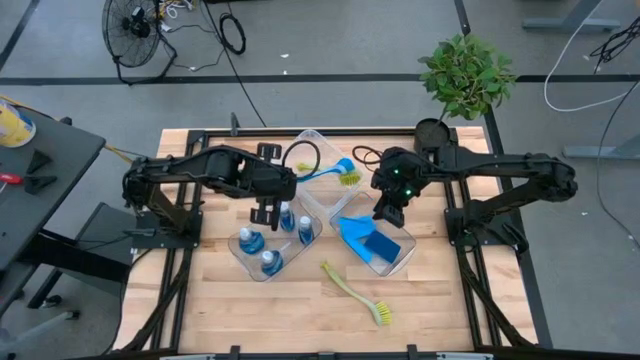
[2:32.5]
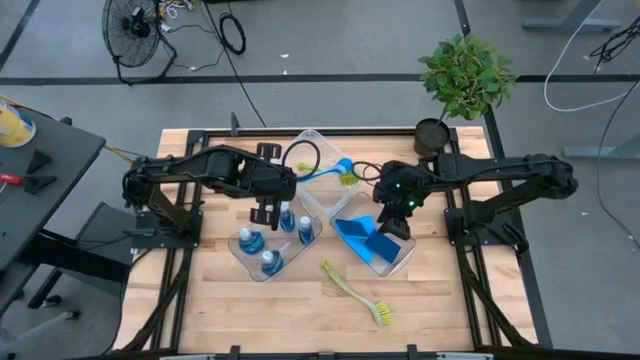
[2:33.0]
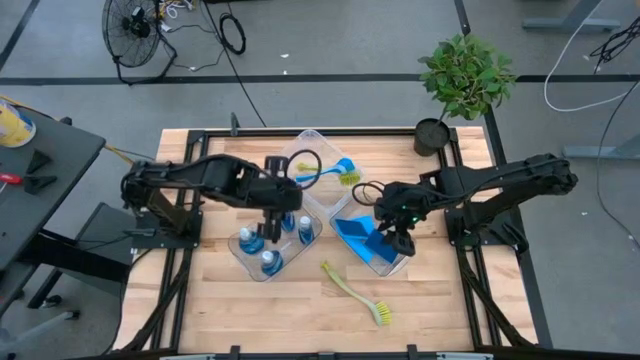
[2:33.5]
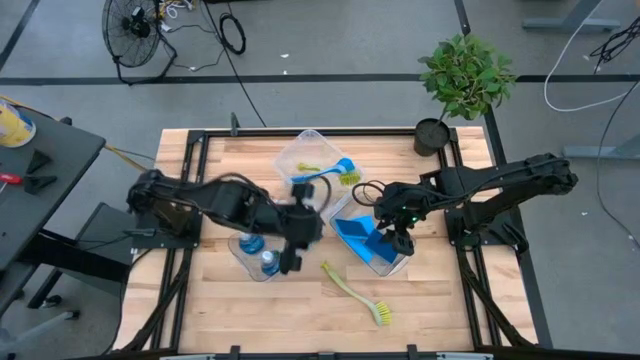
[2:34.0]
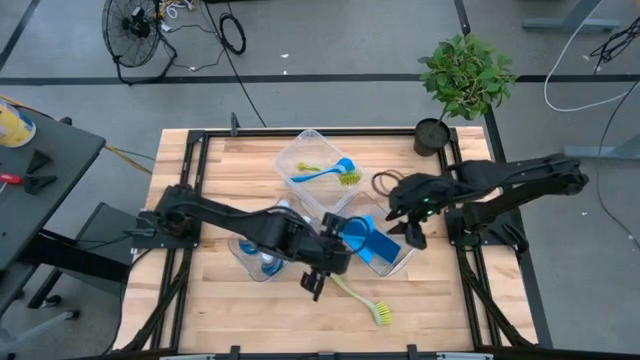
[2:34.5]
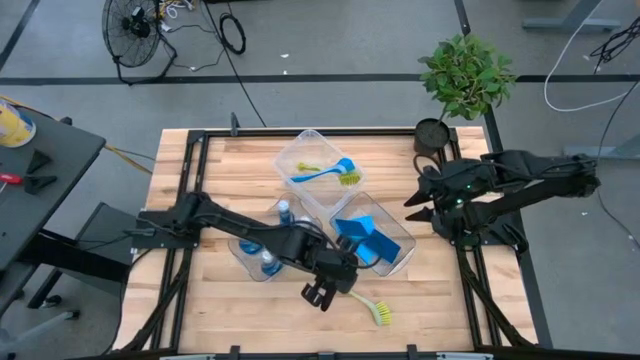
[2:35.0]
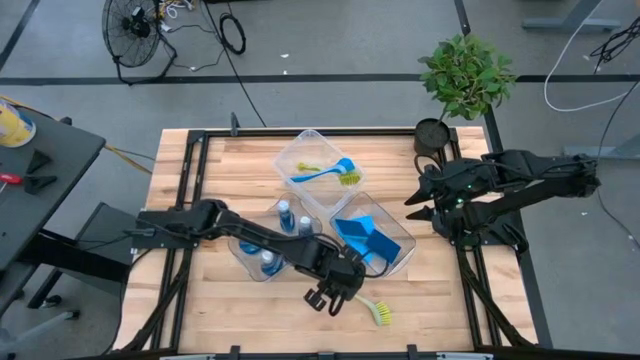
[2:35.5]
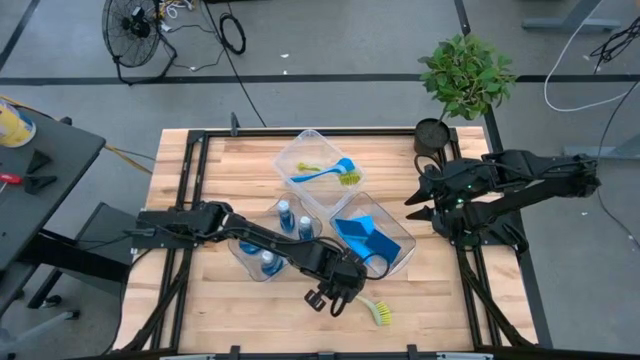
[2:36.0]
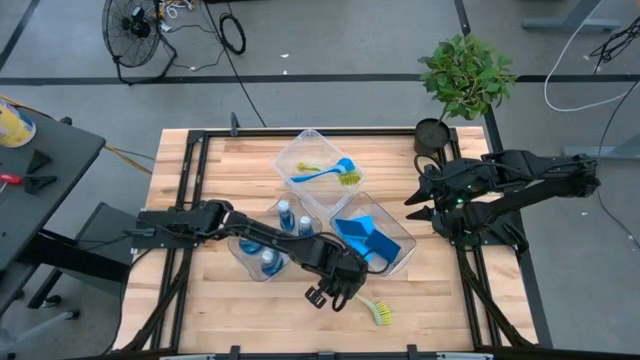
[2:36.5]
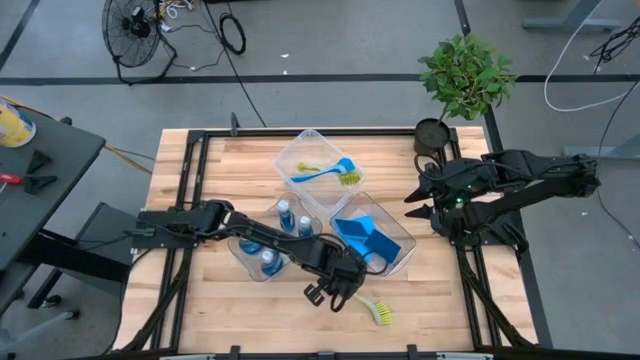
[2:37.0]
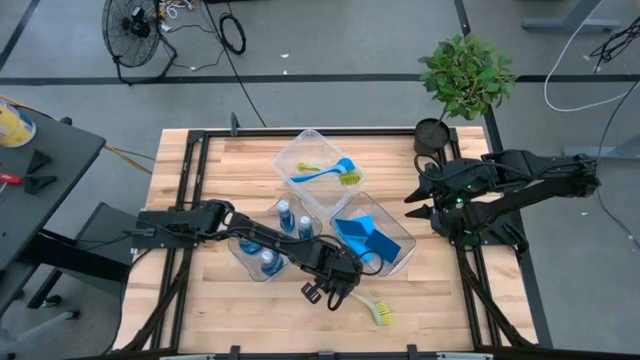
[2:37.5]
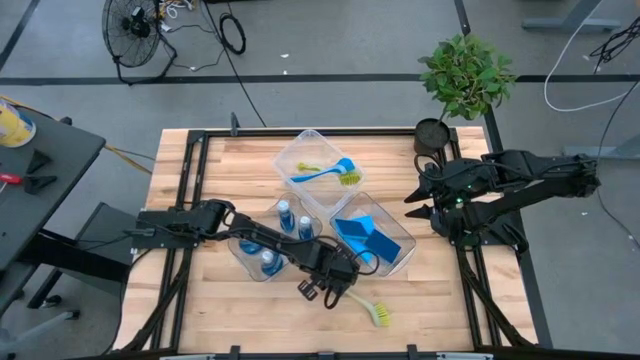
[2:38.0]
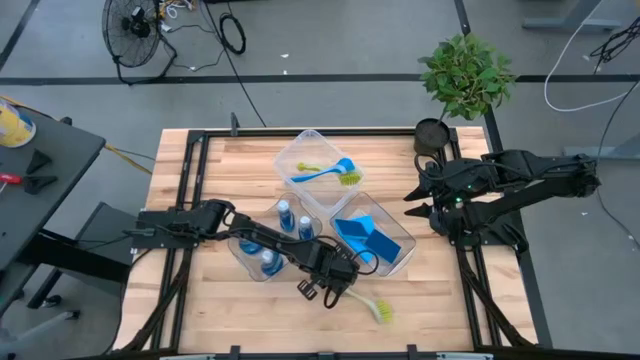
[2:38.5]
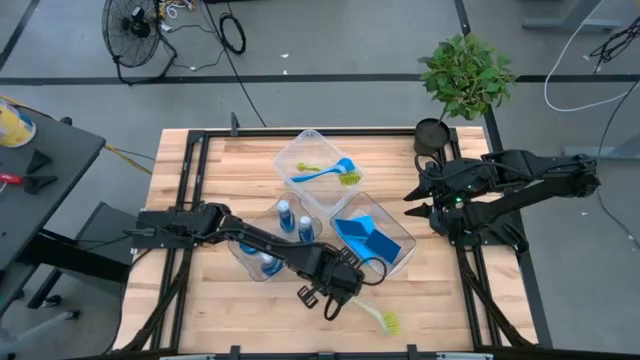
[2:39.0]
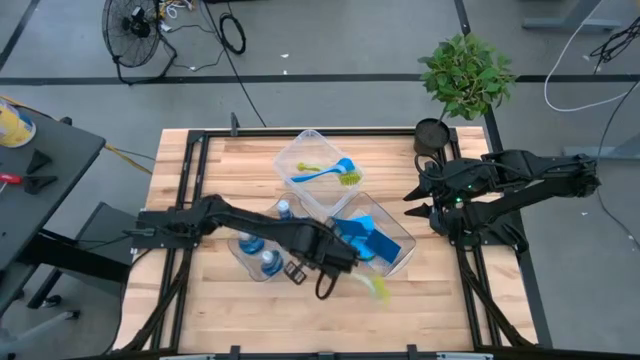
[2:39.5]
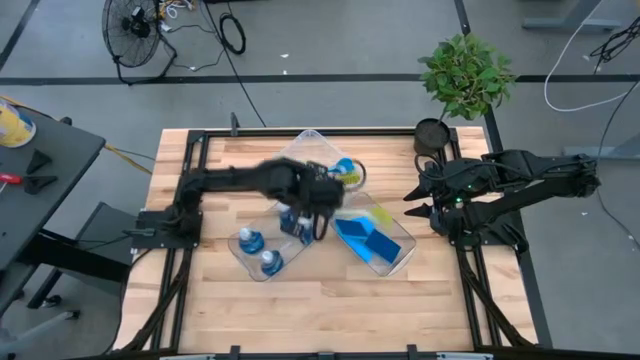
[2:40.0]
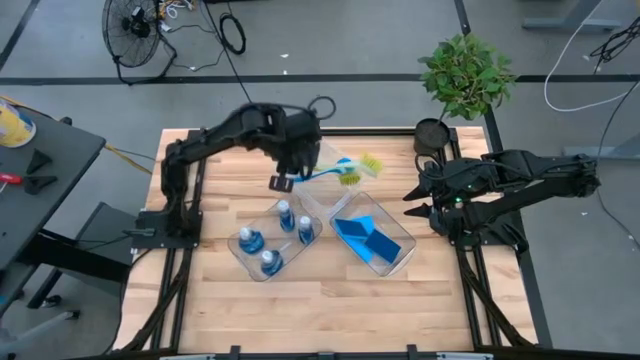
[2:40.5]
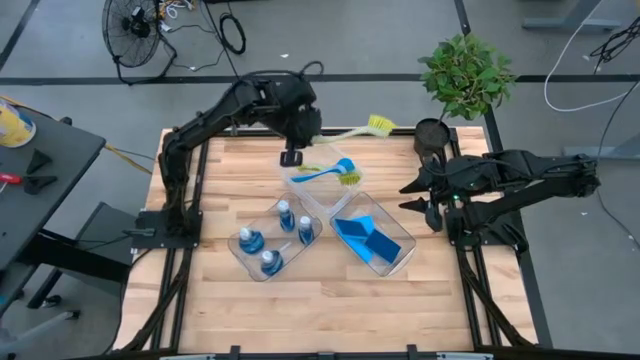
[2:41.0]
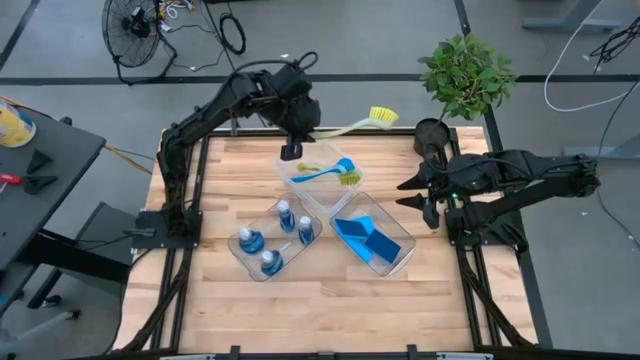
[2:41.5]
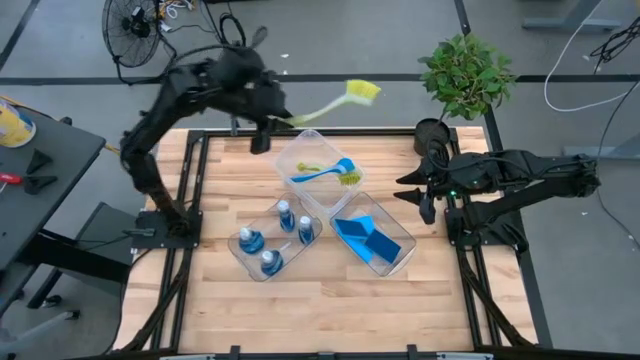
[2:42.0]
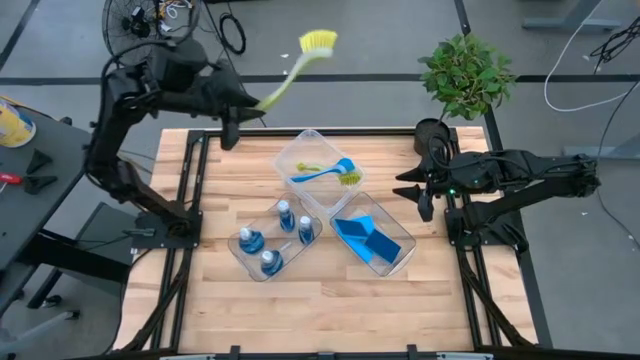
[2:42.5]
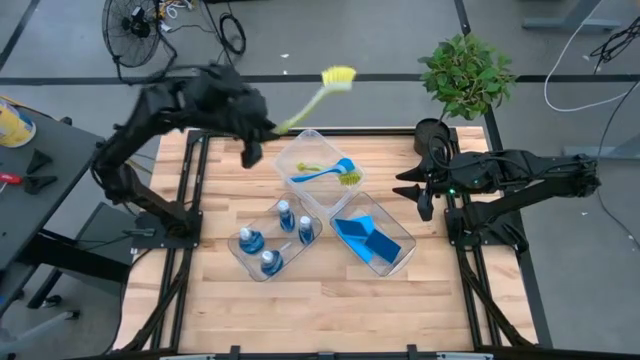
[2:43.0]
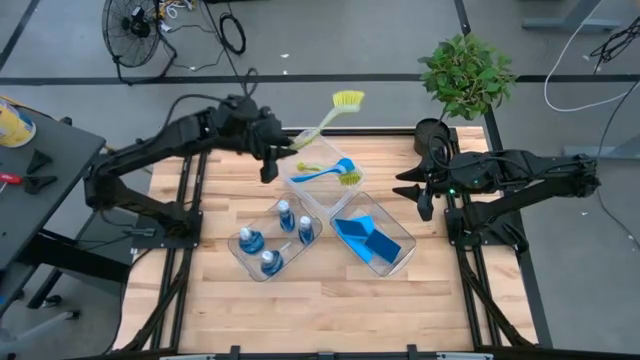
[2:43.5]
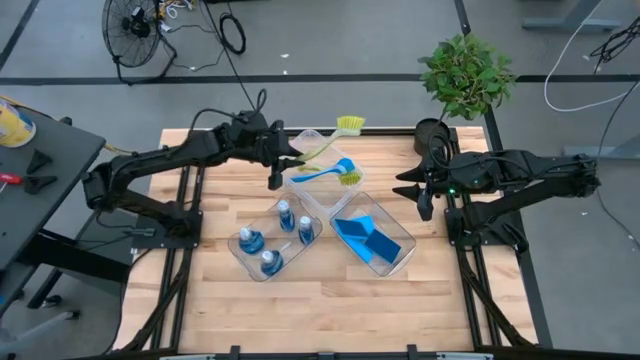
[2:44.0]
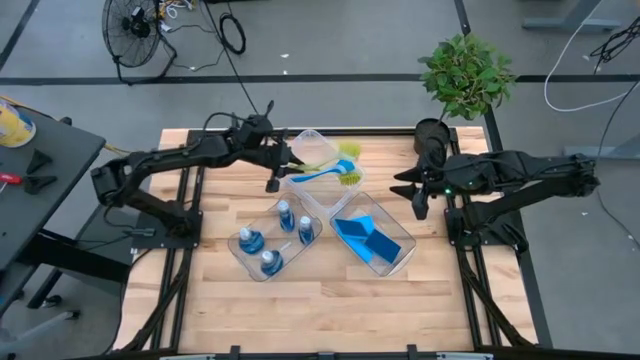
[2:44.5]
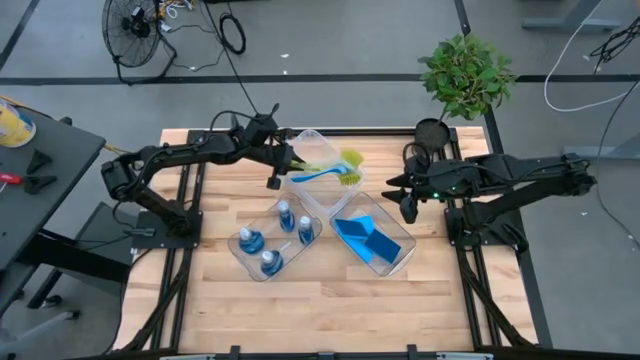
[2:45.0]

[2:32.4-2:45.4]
Task: Pick & Place Kitchen Sink Supplies
Put the yellow toilet brush into the transparent container

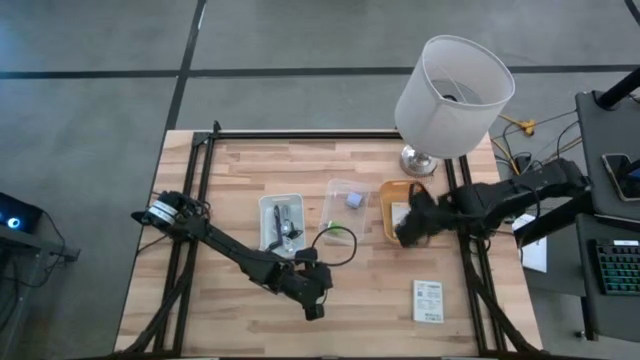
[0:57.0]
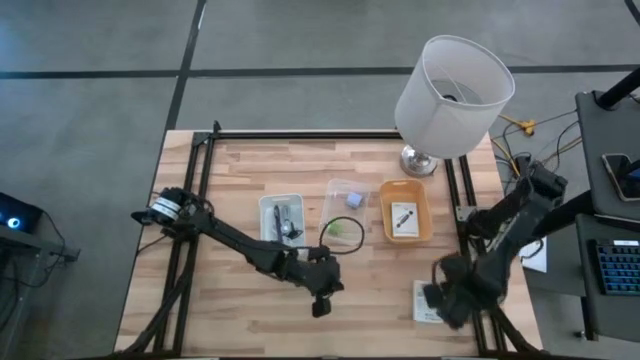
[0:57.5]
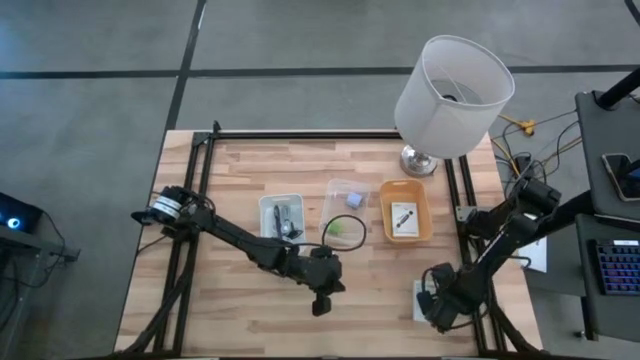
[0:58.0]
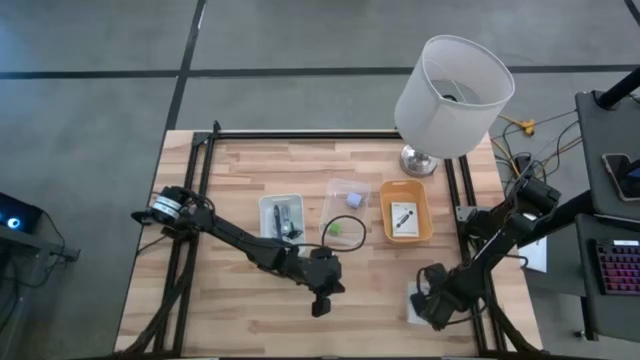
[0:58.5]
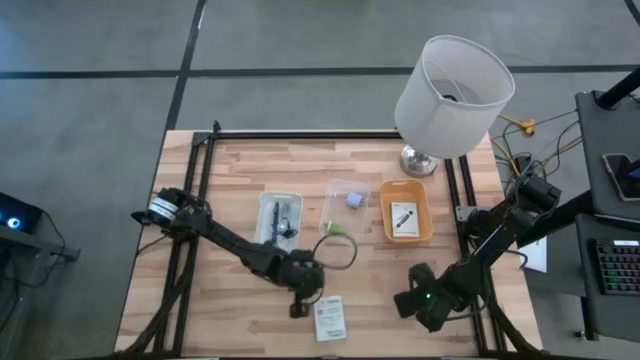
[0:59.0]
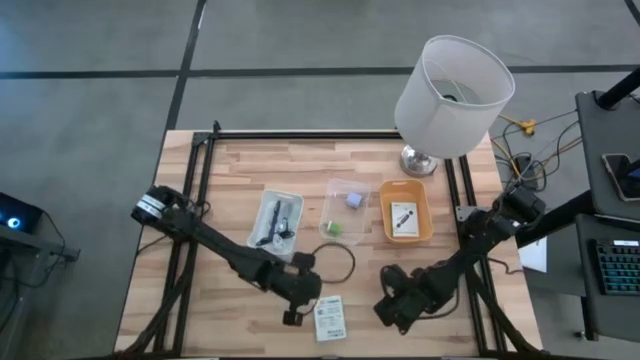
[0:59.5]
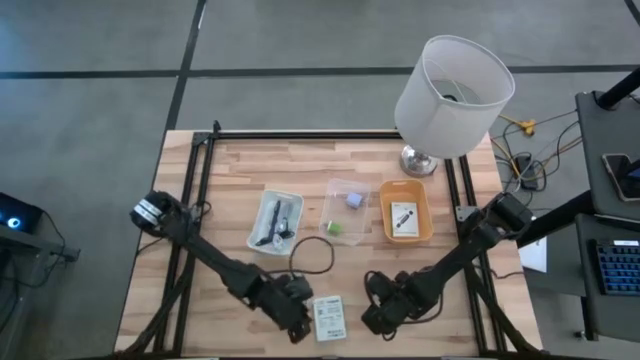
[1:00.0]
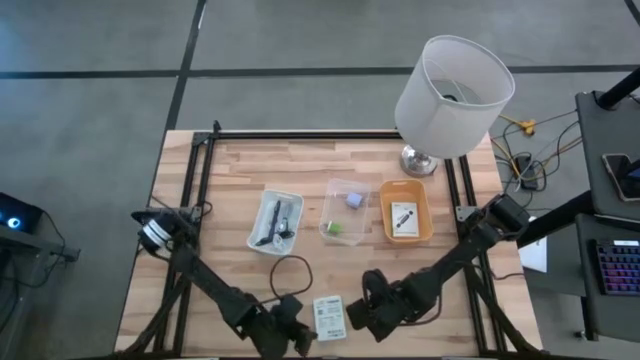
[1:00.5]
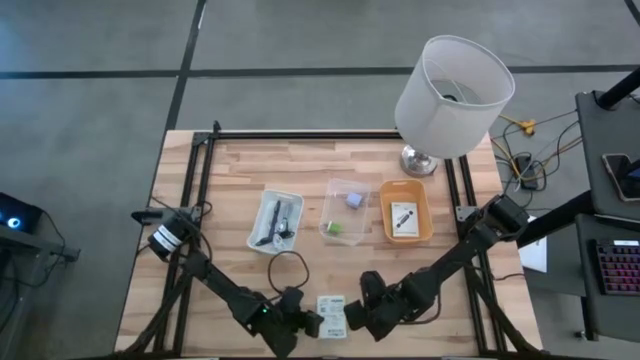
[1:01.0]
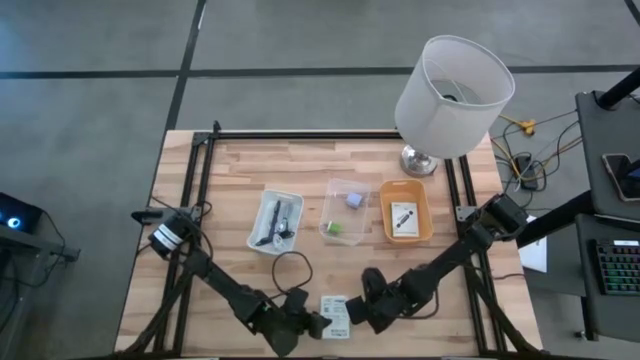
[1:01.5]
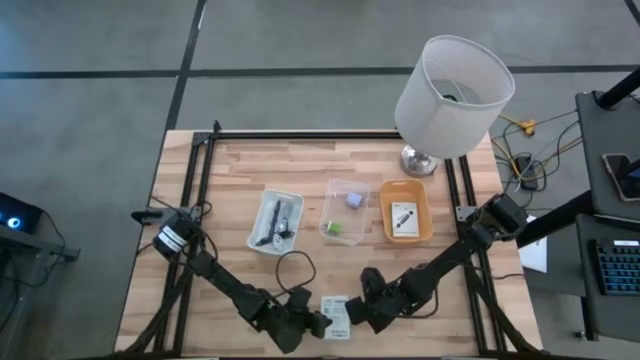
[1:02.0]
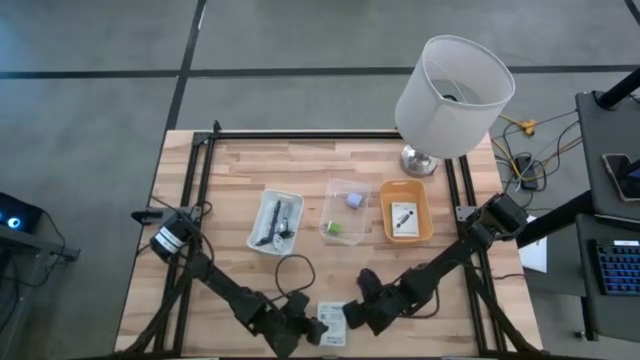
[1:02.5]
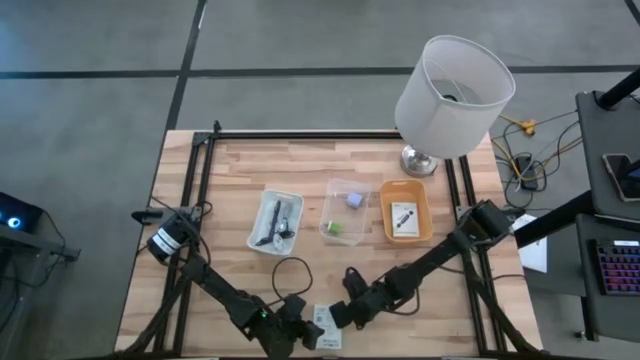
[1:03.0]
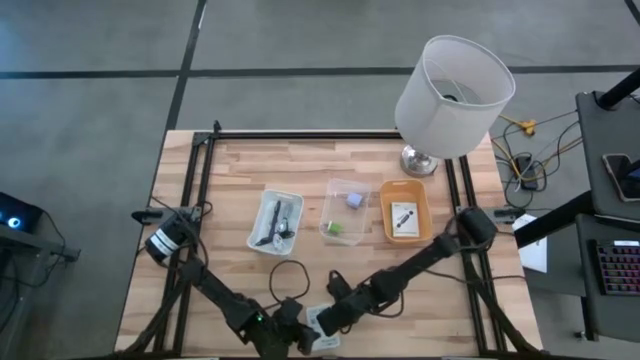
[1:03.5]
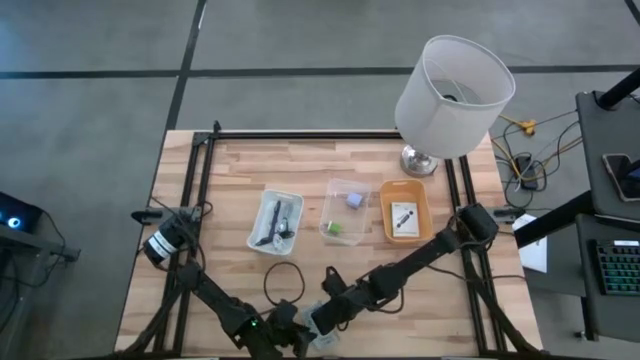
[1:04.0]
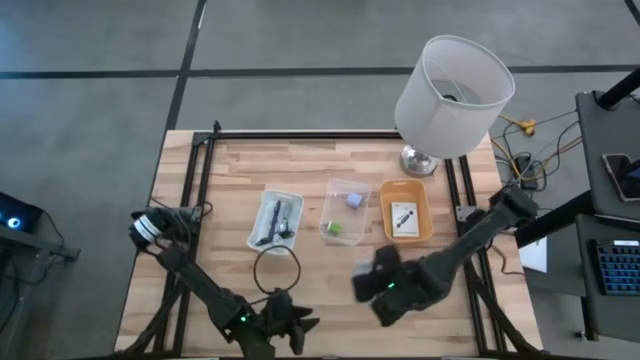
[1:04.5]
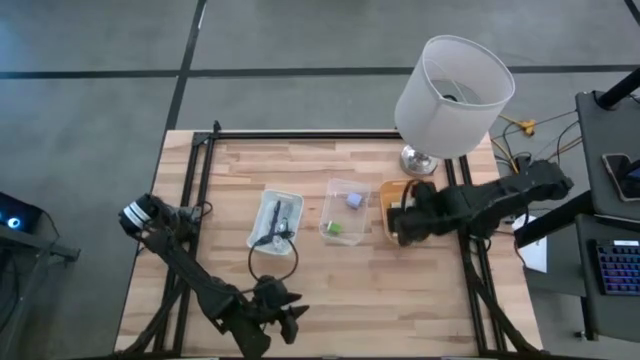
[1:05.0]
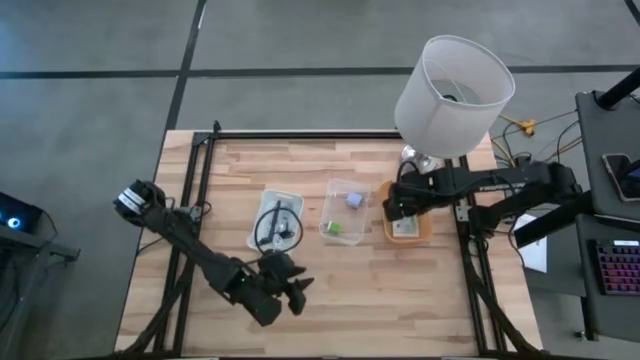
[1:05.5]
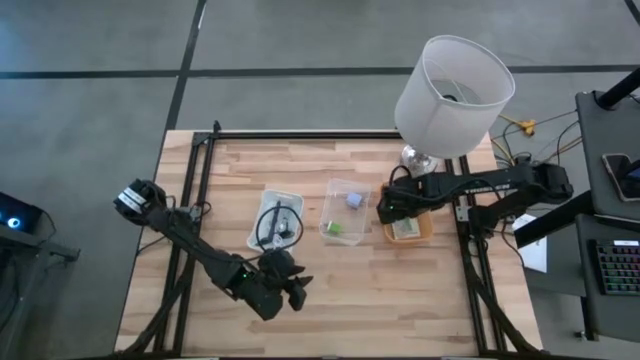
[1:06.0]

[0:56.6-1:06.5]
Task: Pick and place items into bin
Put the card reader box into the yellow bin
